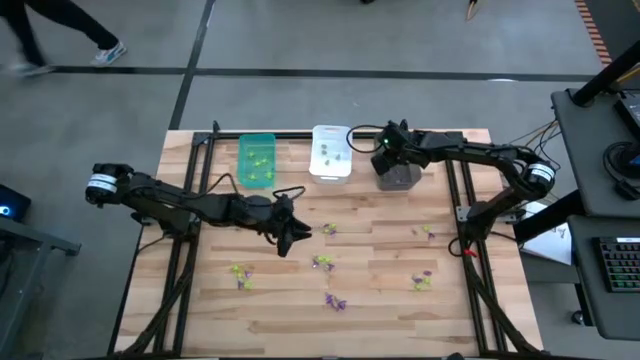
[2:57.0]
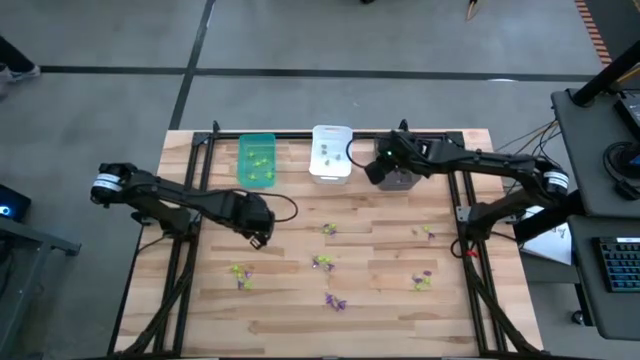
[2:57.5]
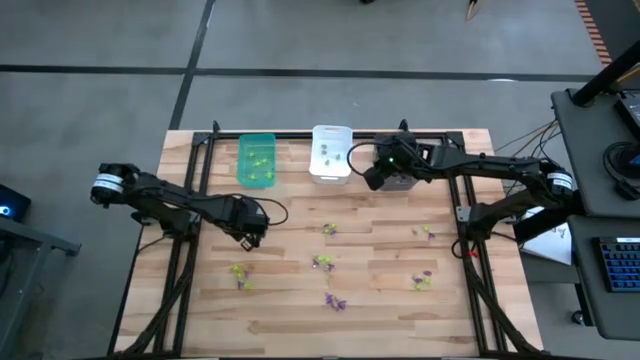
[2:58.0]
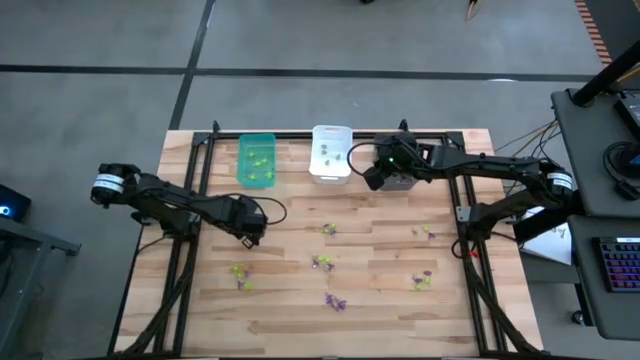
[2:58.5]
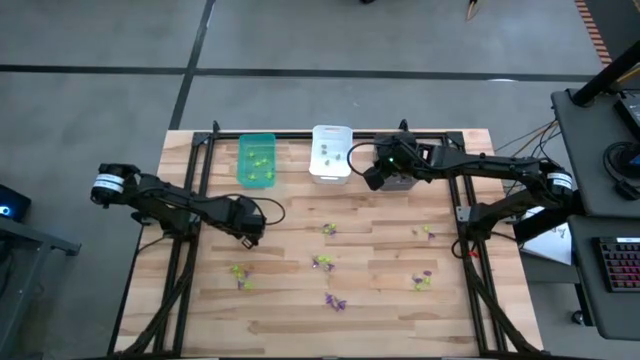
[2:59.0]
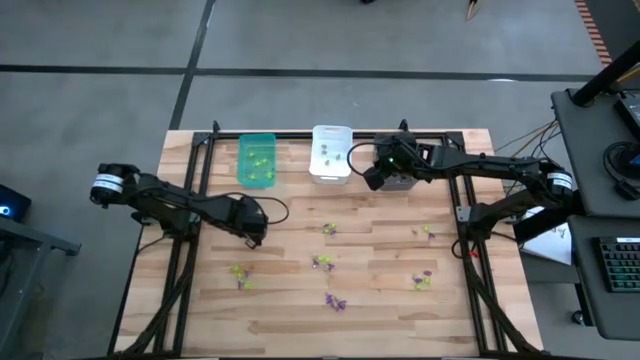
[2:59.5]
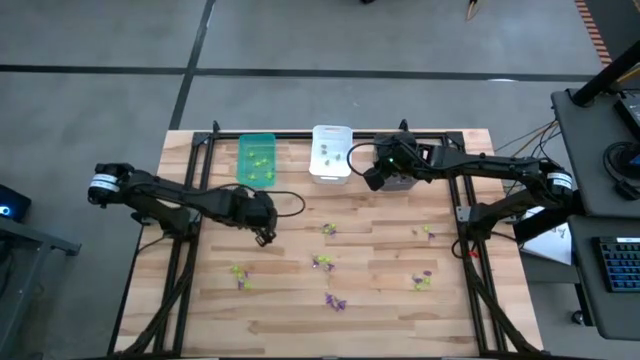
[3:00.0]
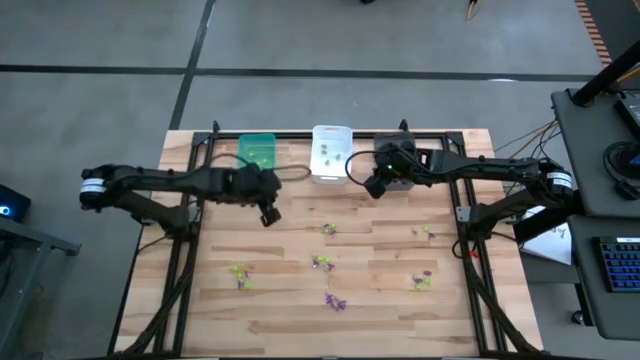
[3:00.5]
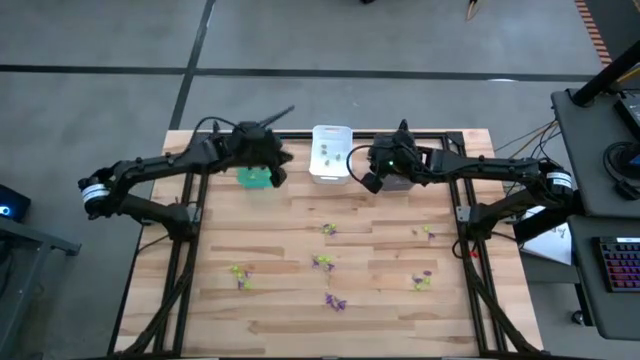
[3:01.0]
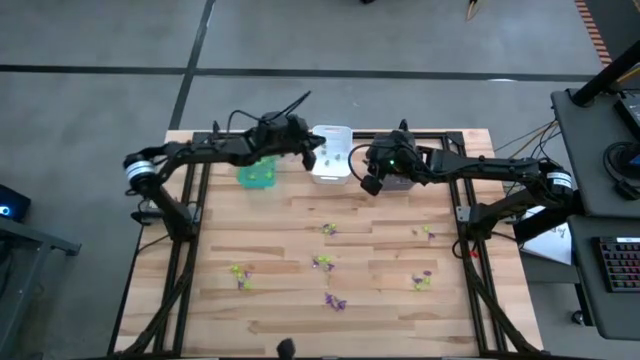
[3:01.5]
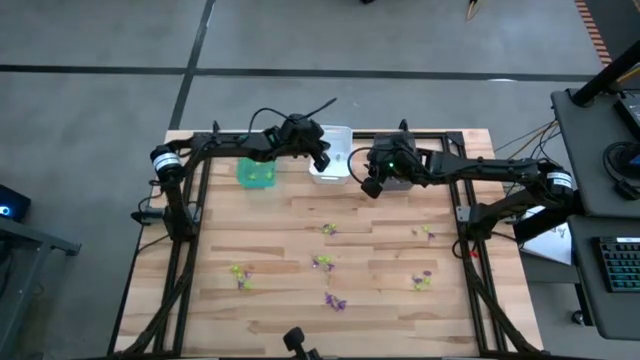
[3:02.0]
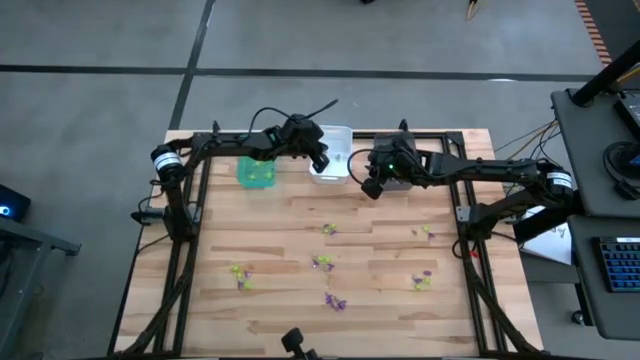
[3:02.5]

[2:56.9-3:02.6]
Task: Sort Halloween decoration
Put the white skull toy into the white bin

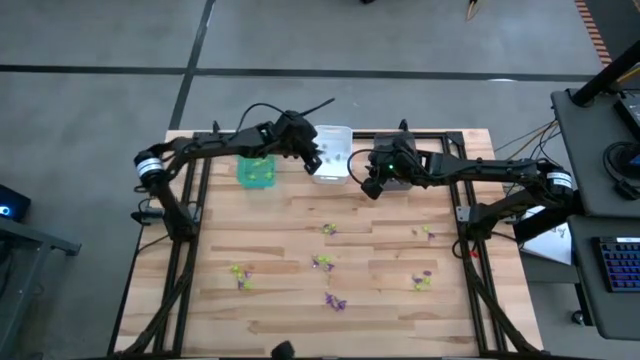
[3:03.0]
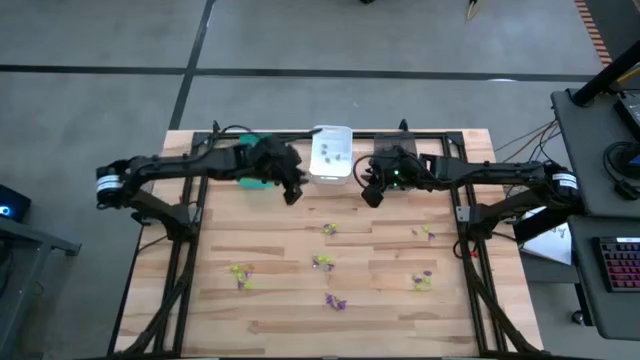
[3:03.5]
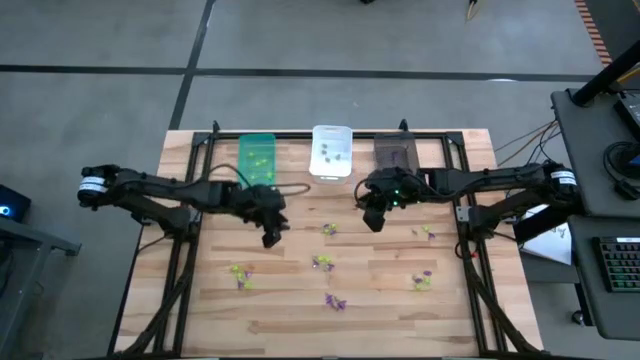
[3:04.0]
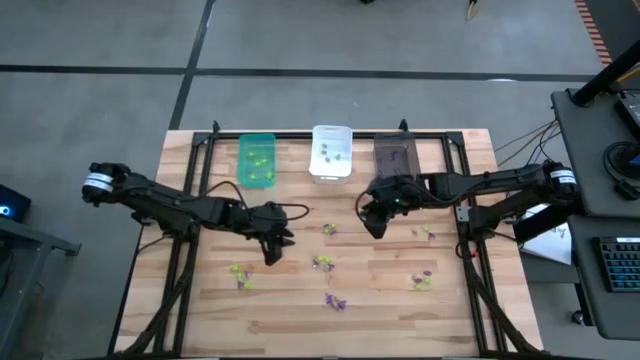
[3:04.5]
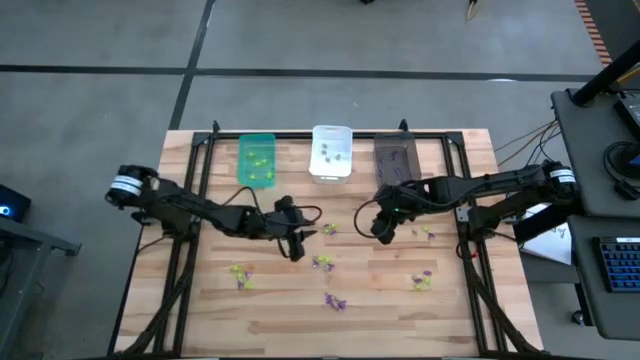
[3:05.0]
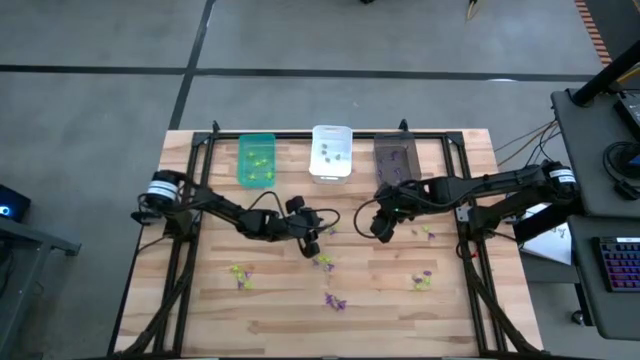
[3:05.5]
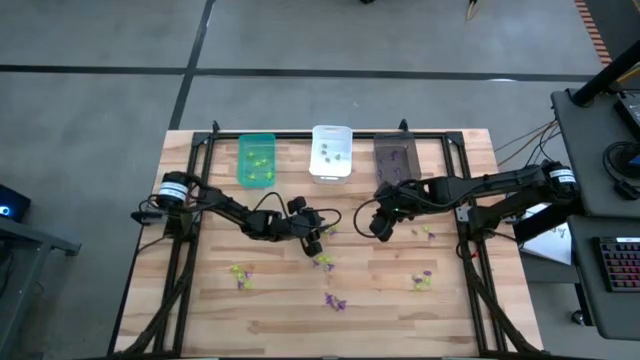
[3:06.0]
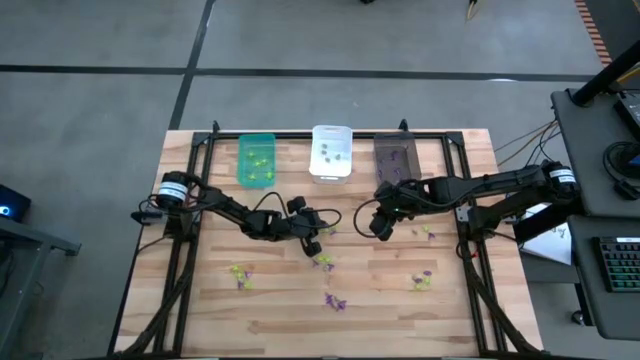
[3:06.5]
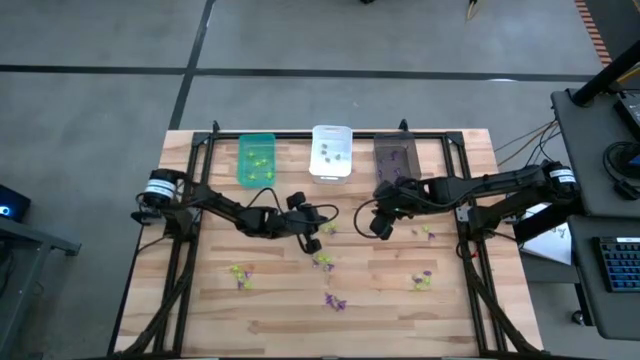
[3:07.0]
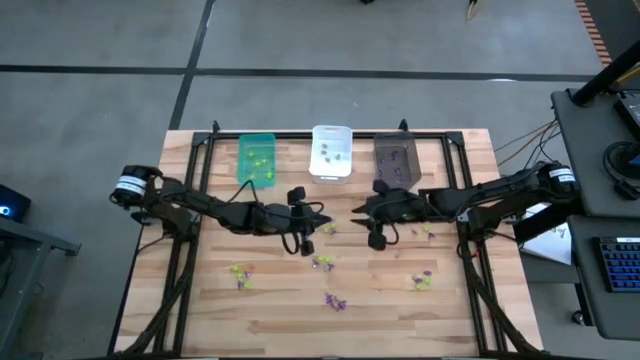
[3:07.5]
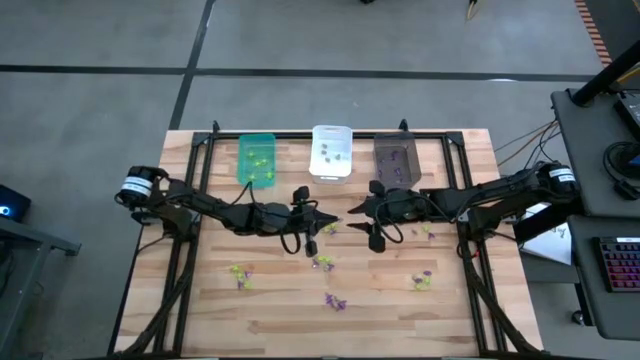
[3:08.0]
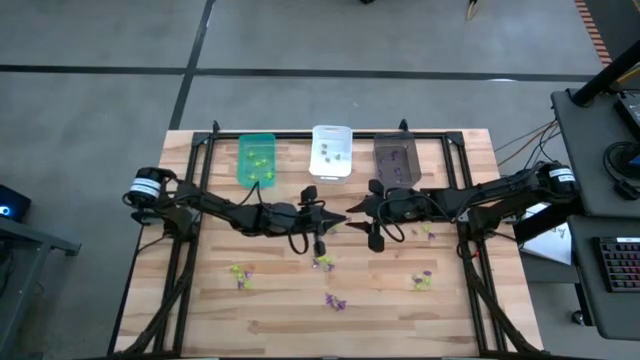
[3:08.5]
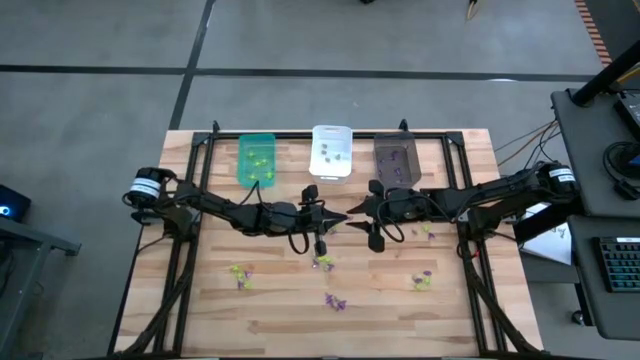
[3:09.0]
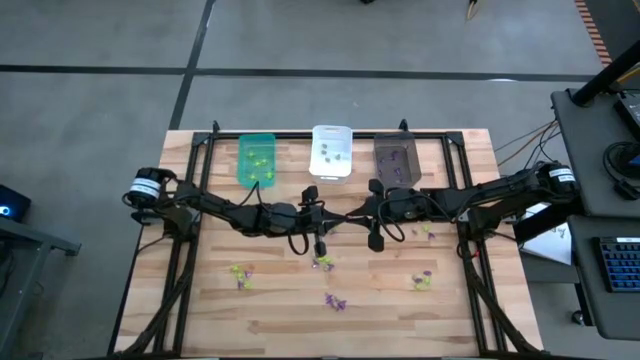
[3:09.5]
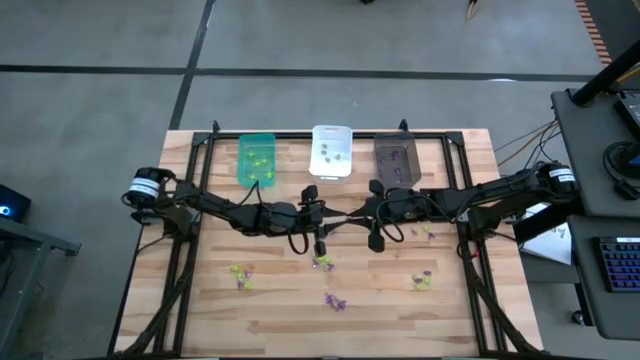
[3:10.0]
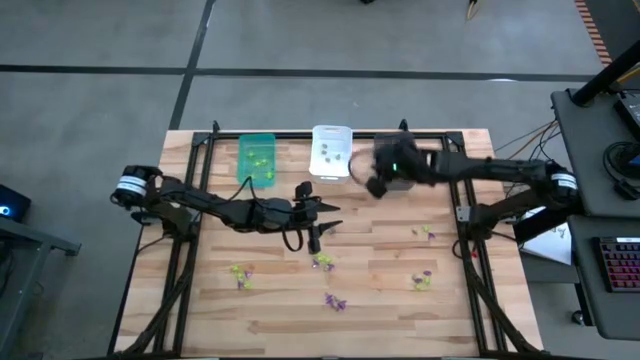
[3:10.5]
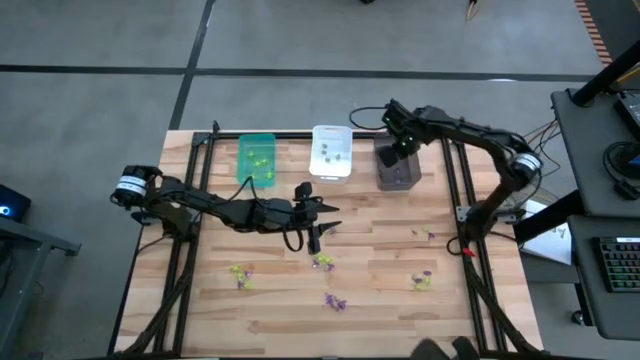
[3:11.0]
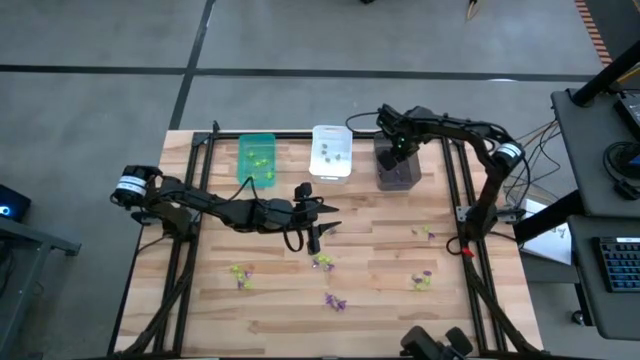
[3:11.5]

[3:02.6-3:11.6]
Put the purple witch hat toy into the gray bin

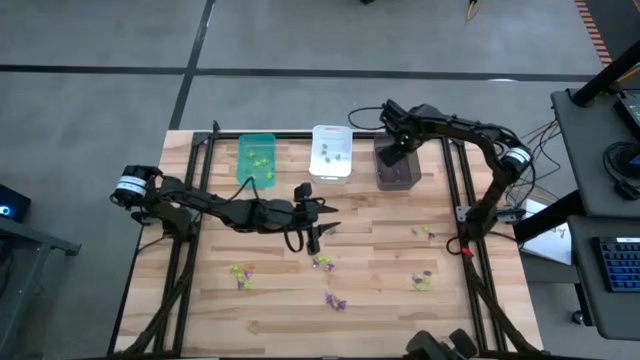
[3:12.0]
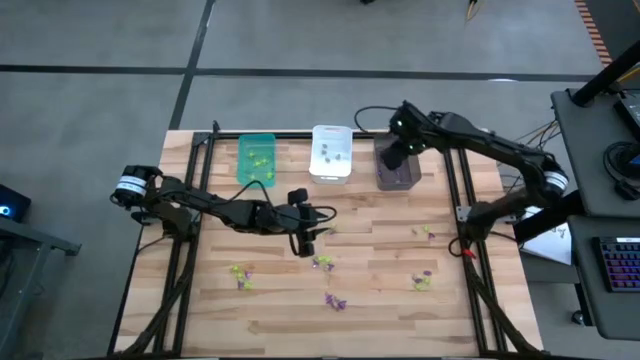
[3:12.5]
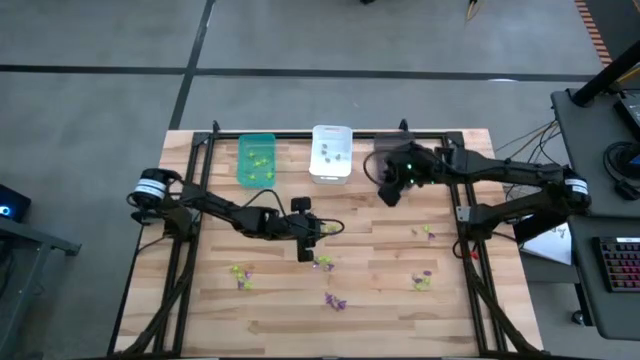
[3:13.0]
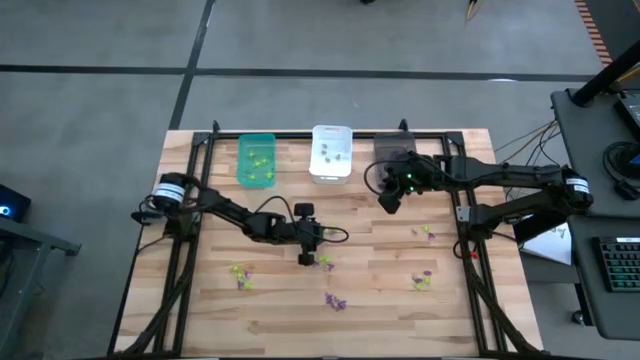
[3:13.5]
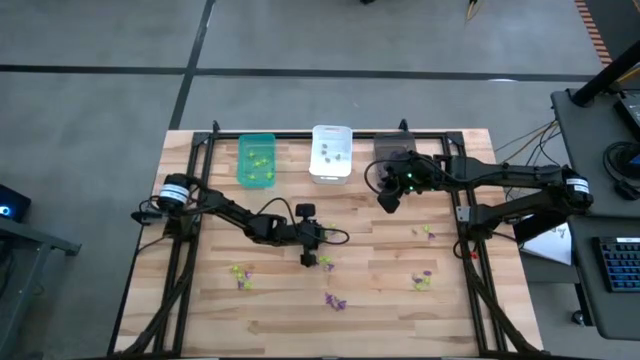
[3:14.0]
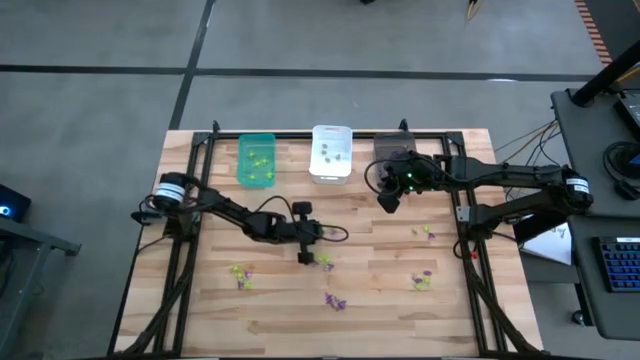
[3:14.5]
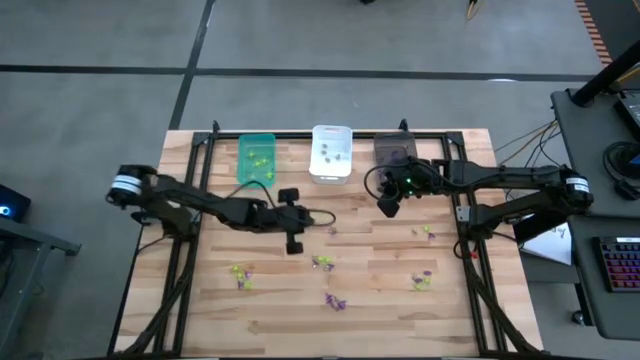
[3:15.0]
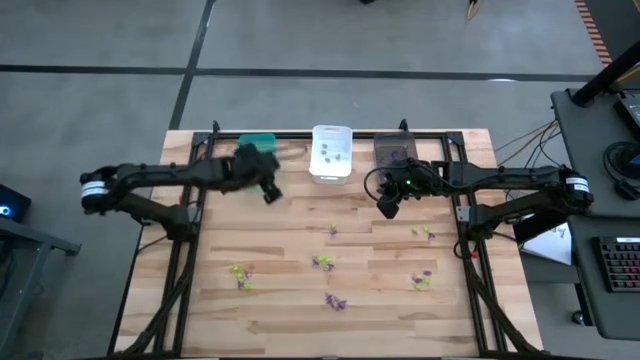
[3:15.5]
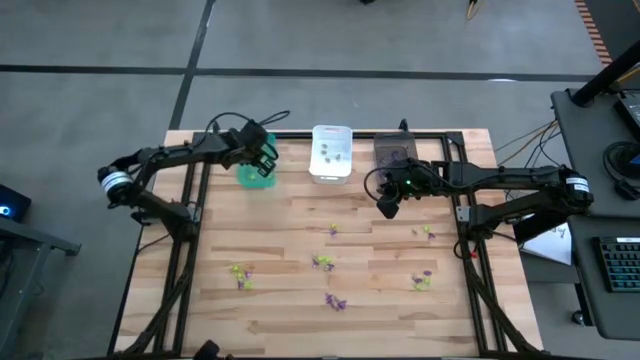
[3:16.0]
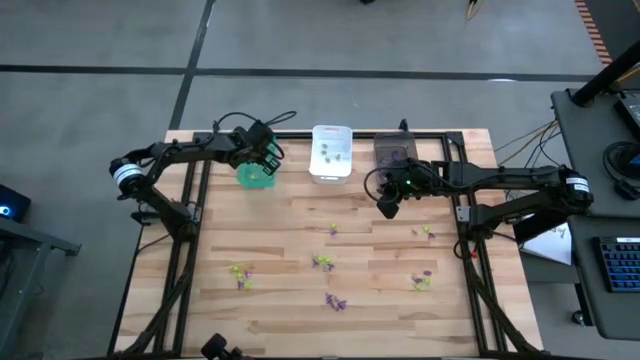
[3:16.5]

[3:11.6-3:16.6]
Put the green spider toy into the blue bin
